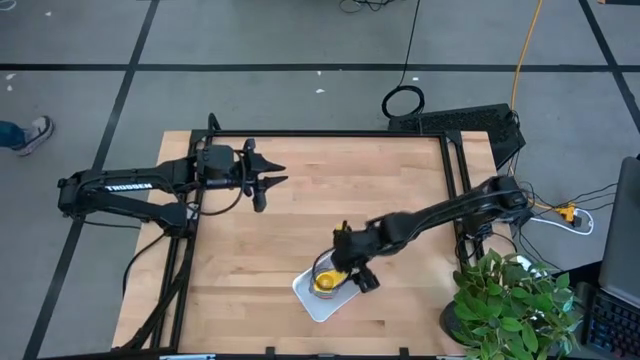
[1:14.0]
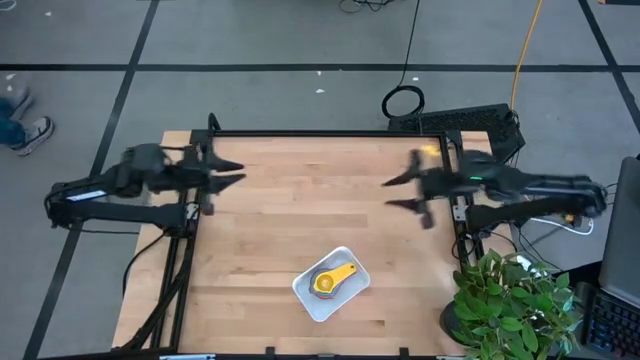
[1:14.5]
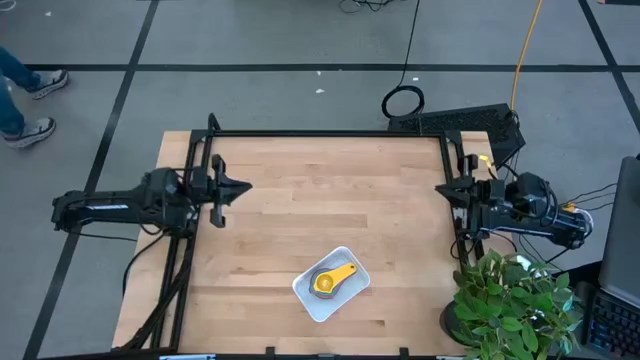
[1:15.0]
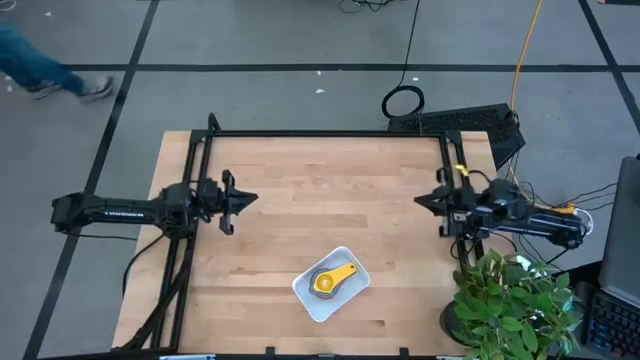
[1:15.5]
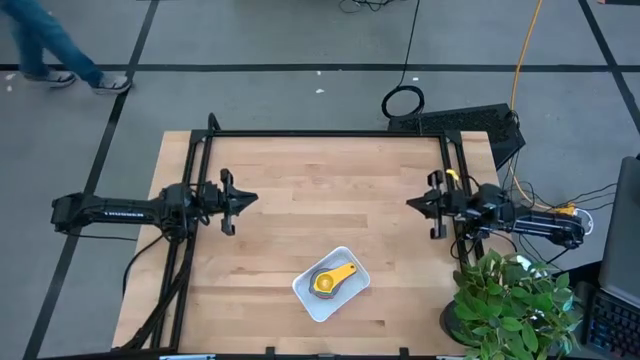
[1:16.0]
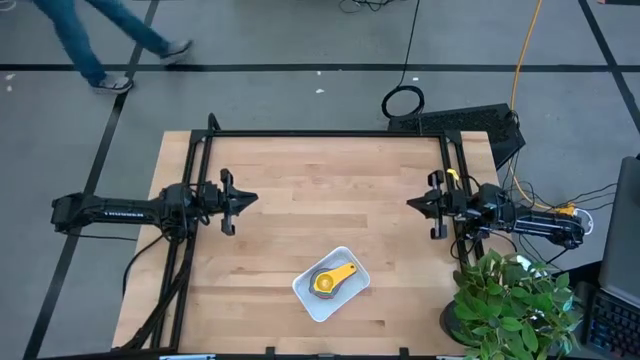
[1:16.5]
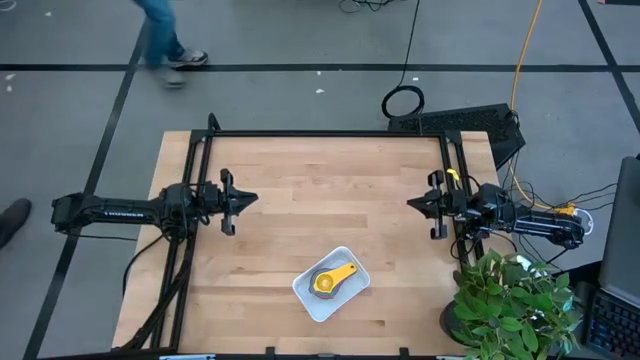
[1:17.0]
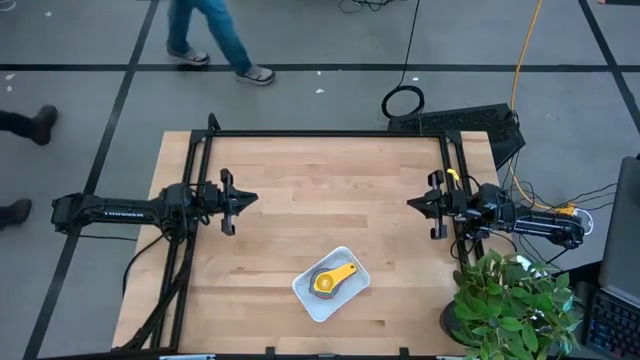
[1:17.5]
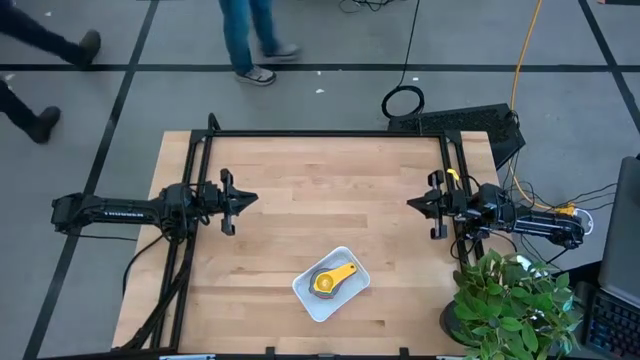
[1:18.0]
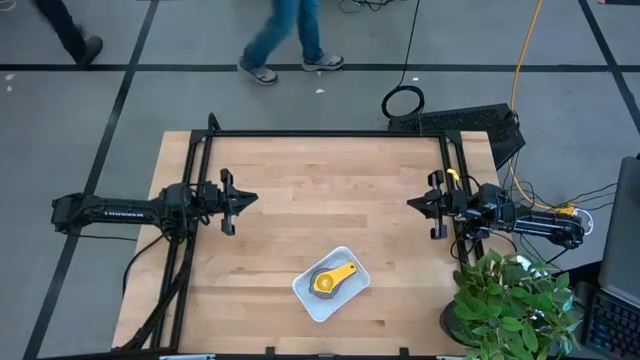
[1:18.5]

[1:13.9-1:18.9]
Task: Nest measuring cups in basket
Return to Home Position

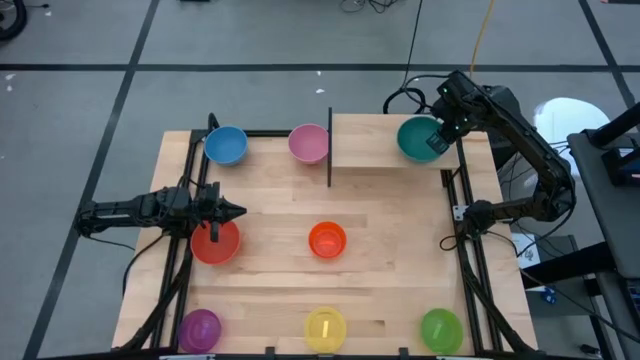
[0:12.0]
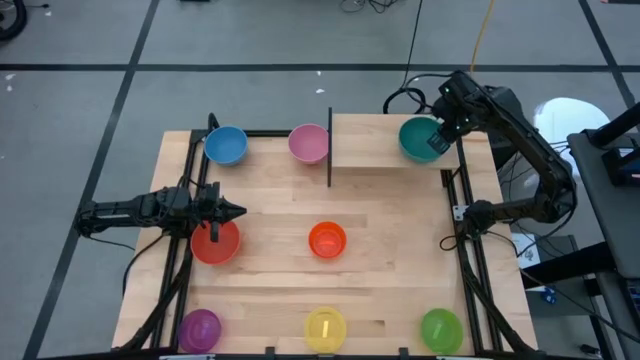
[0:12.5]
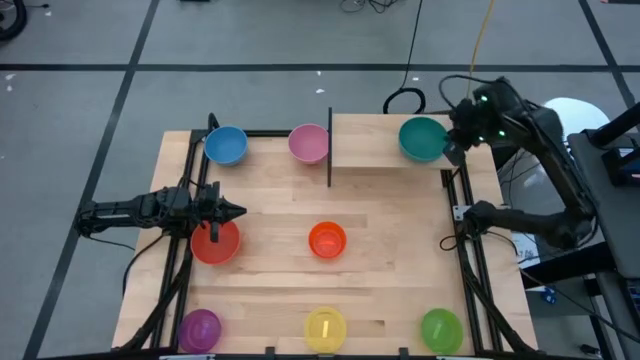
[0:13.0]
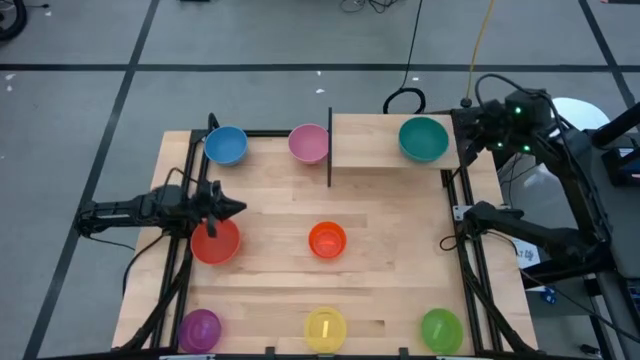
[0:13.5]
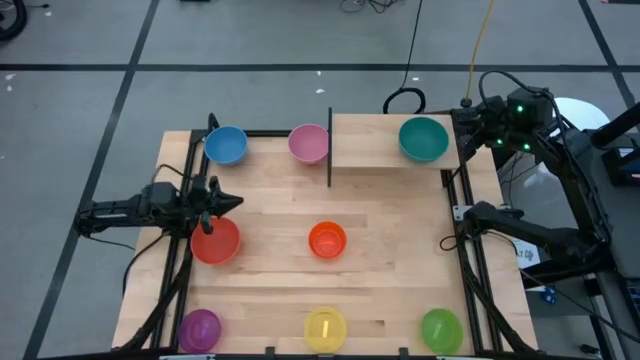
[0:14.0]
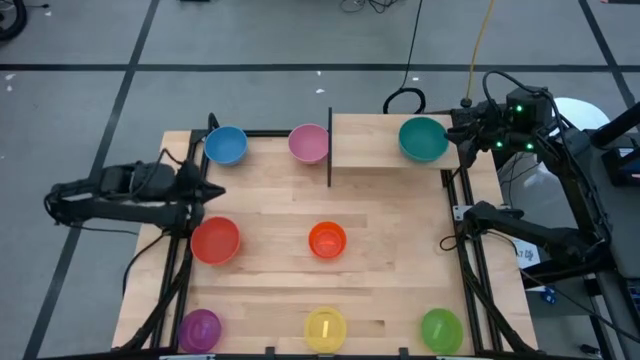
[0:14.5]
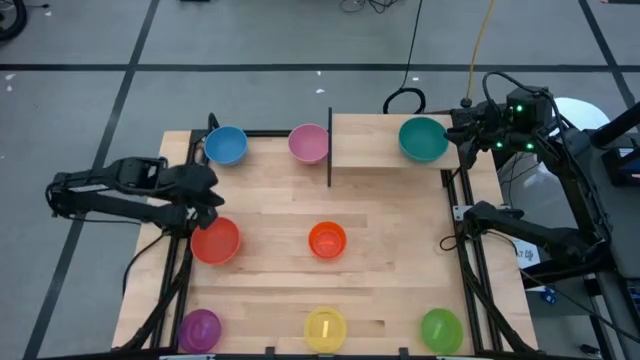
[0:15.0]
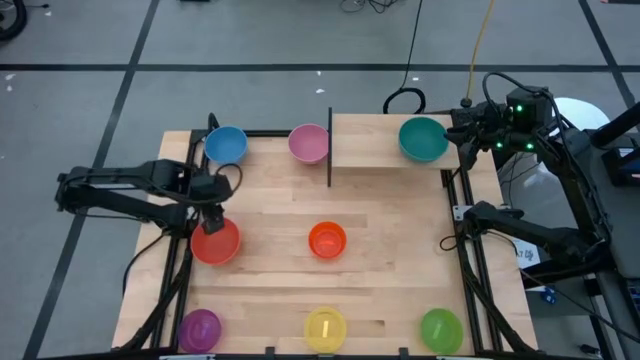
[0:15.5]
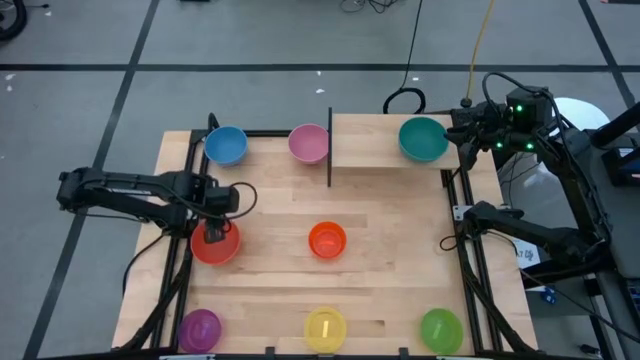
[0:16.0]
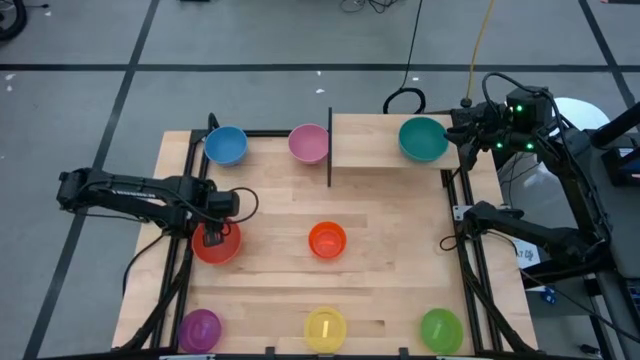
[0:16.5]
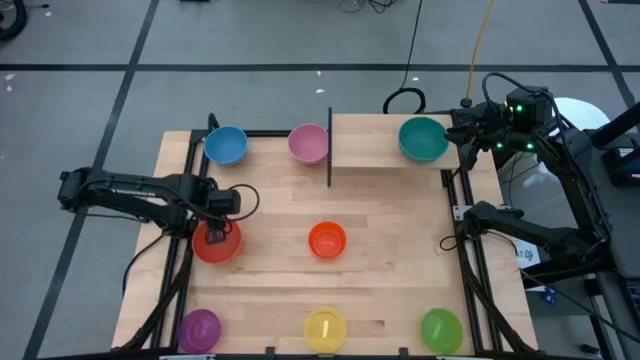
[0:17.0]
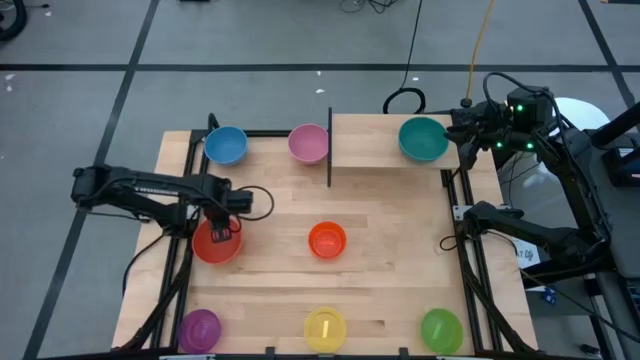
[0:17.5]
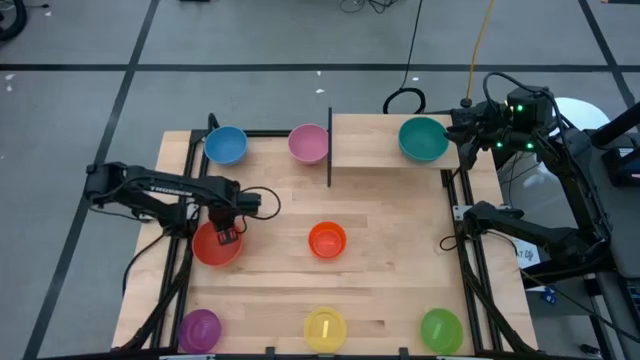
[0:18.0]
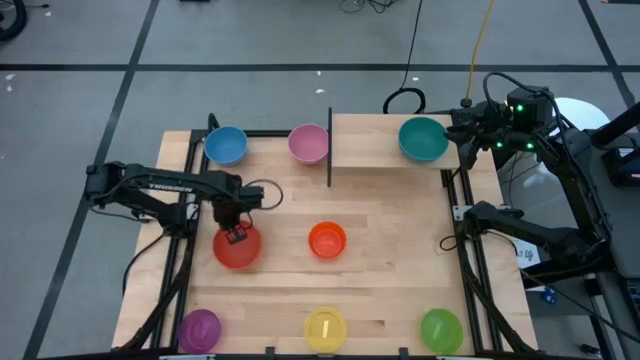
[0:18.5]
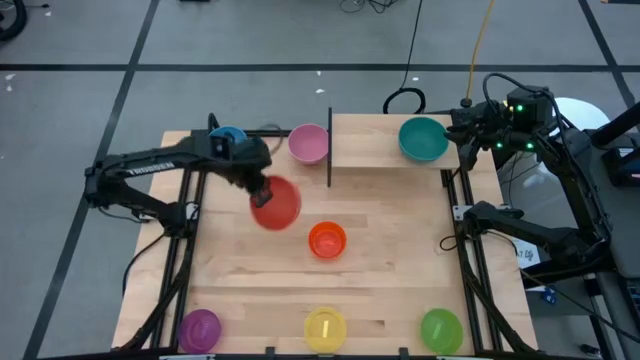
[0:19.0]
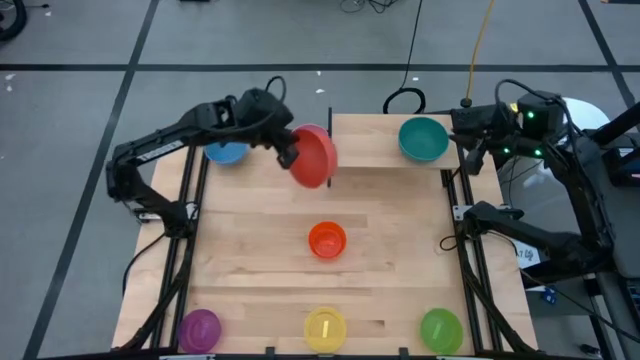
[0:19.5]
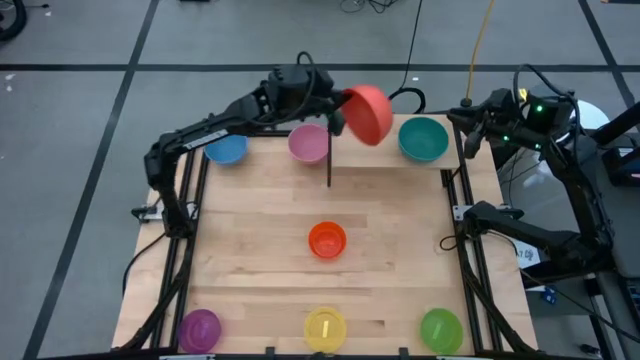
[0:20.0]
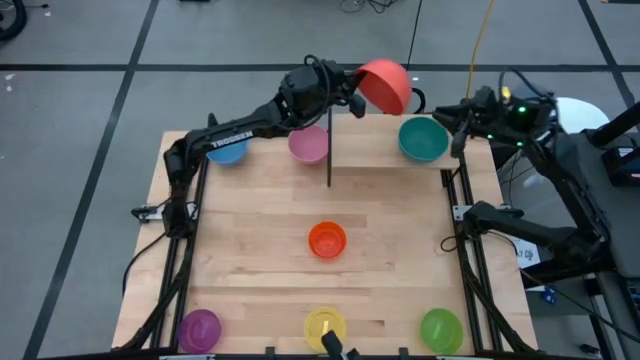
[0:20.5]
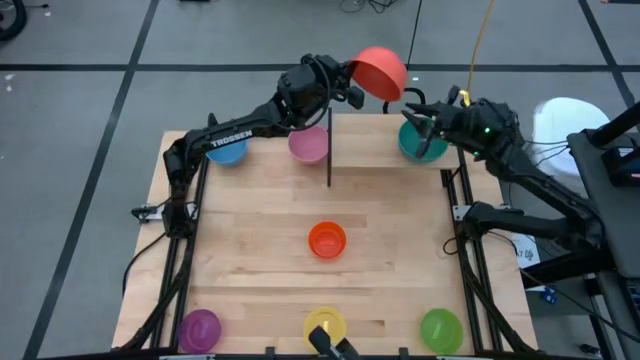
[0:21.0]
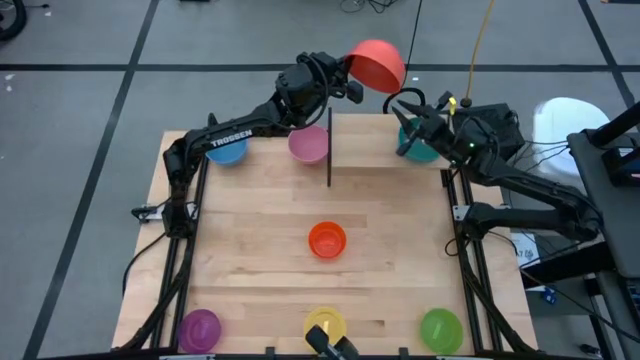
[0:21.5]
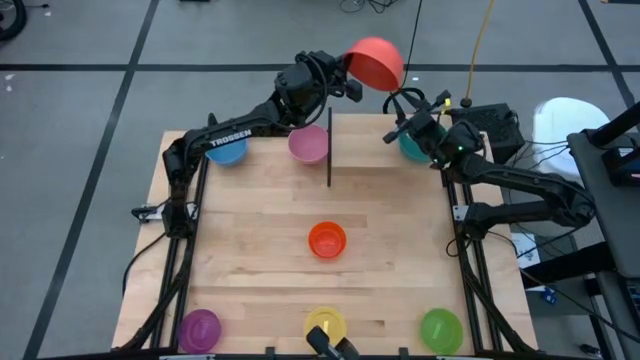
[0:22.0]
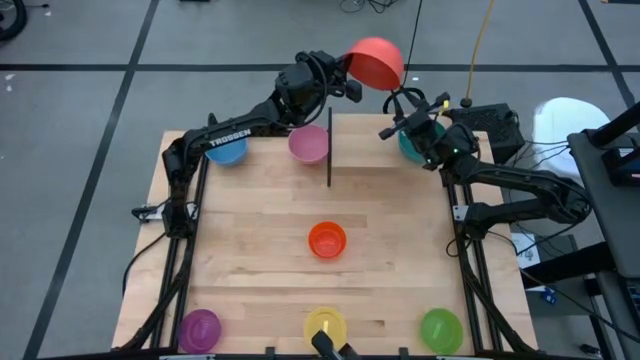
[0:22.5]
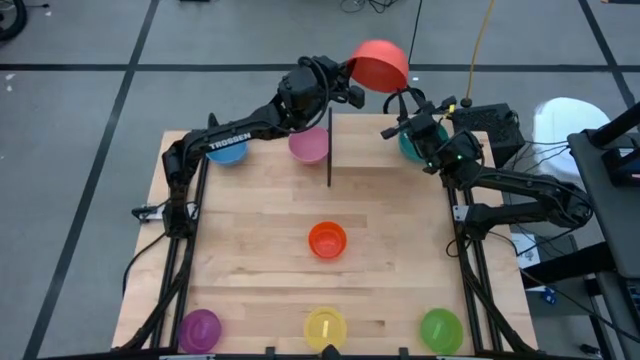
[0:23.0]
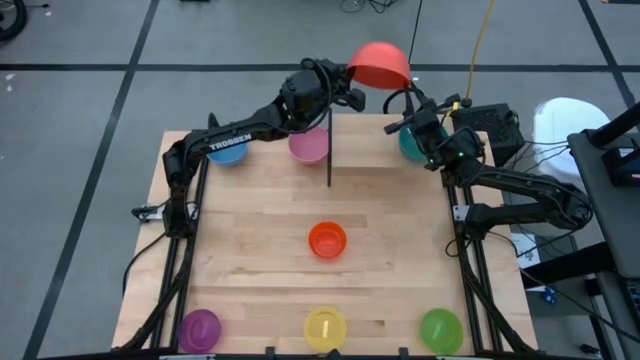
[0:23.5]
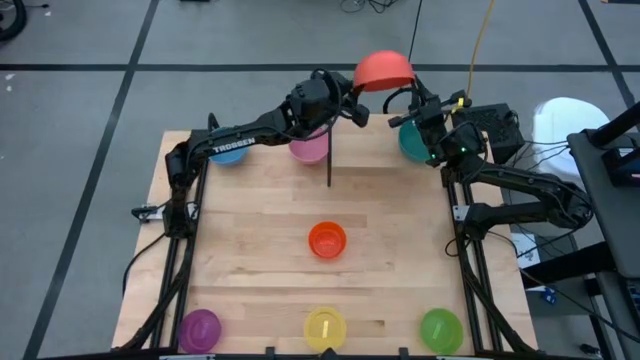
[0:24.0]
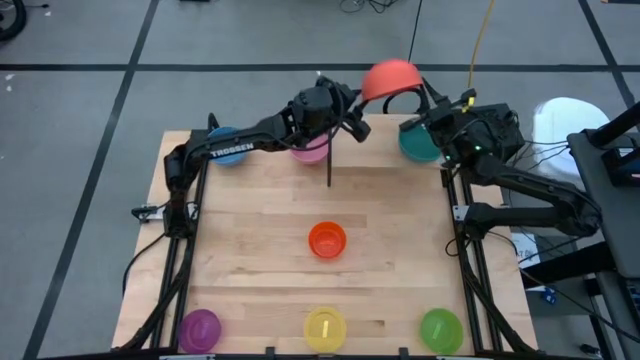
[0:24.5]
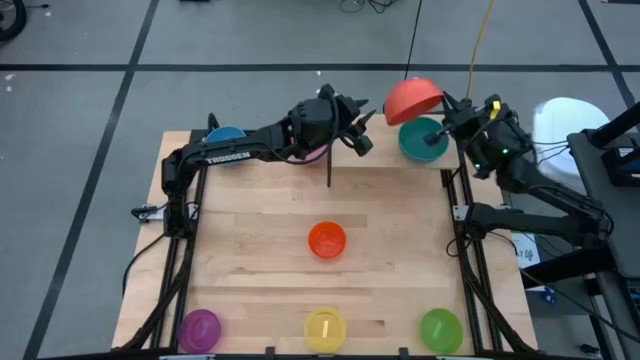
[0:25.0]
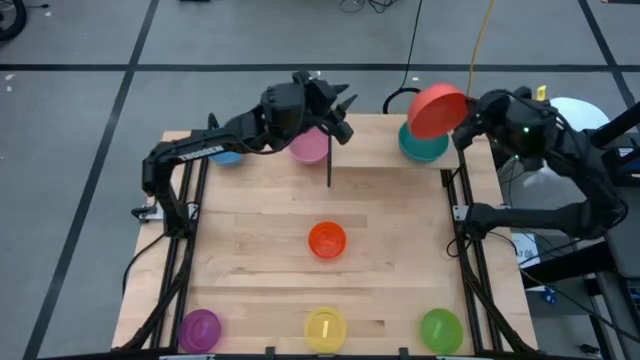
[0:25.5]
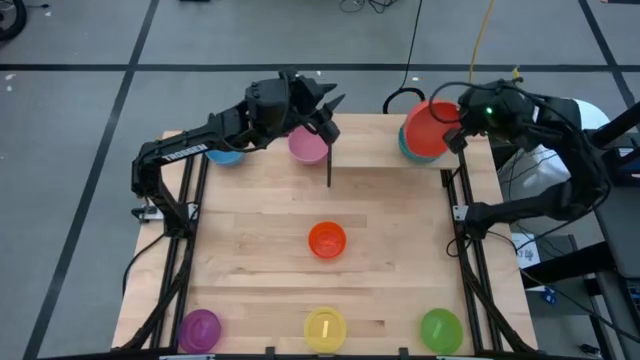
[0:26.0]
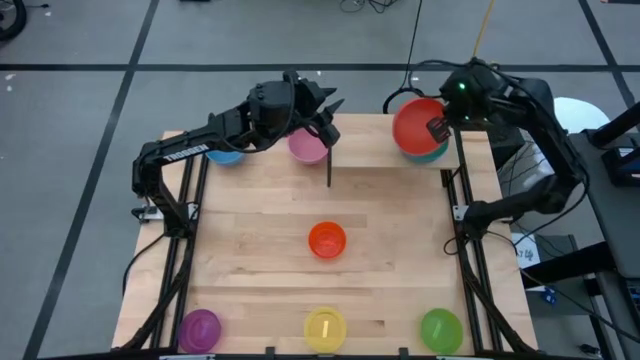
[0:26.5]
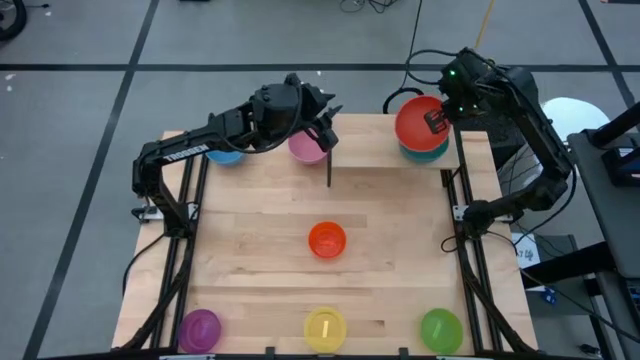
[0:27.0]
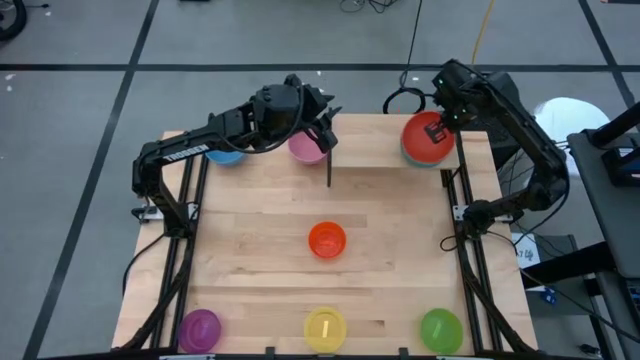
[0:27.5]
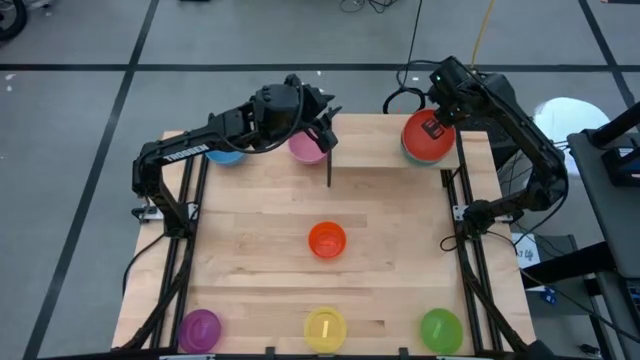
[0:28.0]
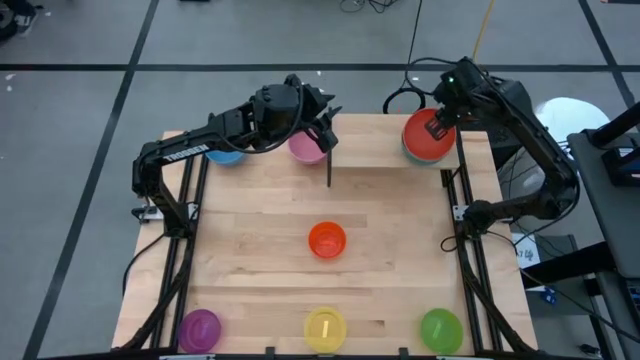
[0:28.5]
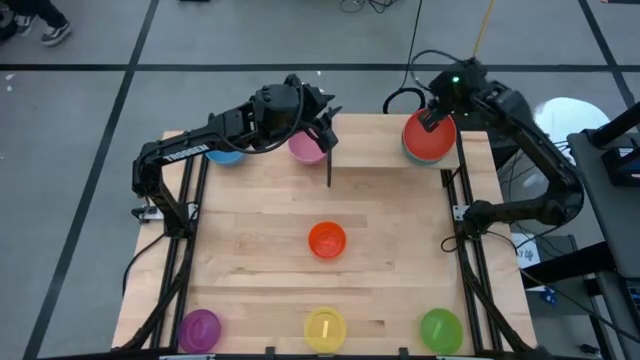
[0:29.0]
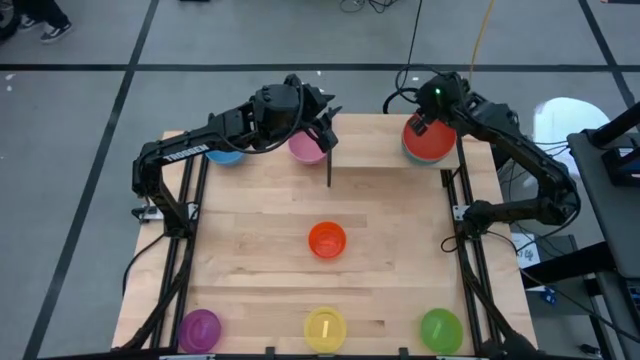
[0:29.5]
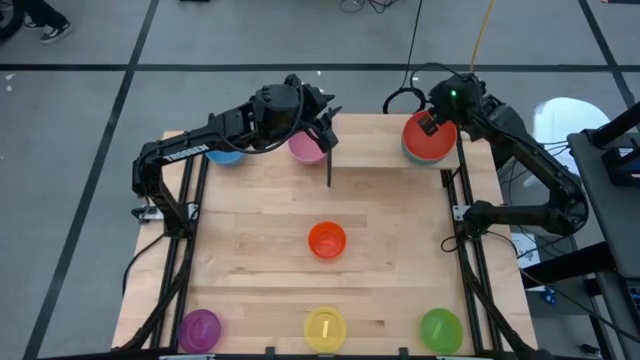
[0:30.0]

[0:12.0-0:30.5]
Task: Place and stack bowls onto a shelf
Stack the red bowl inside the dark blue bowl on the shelf
